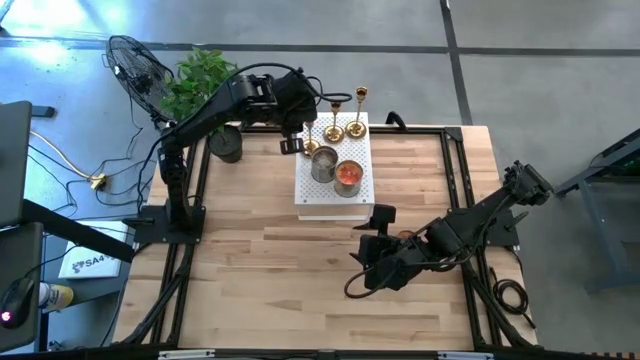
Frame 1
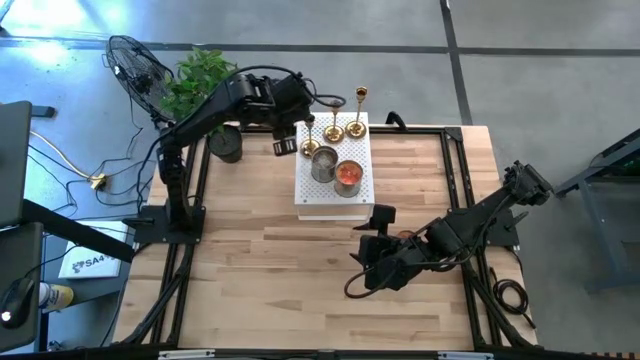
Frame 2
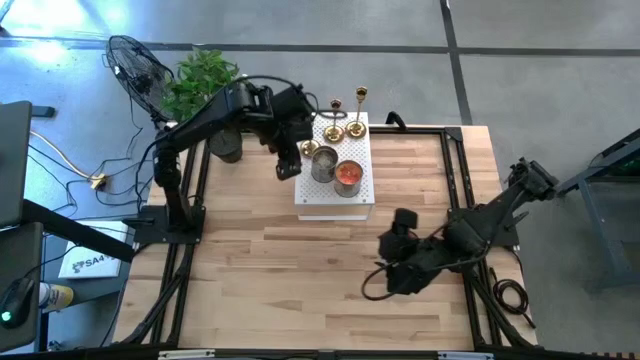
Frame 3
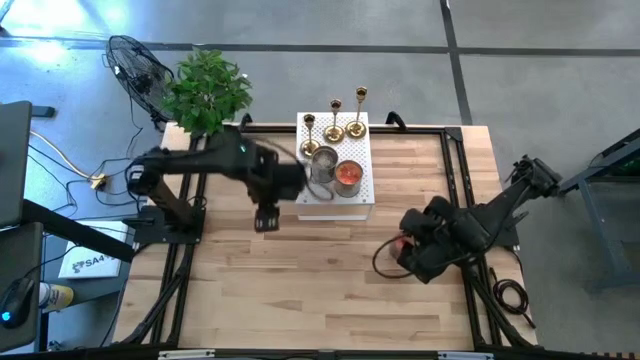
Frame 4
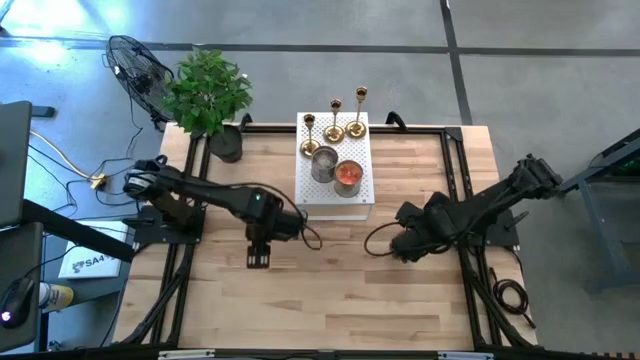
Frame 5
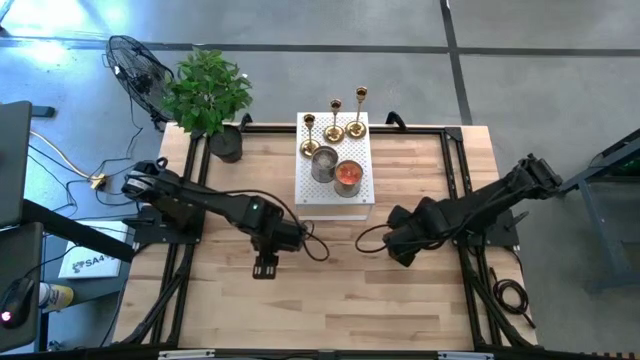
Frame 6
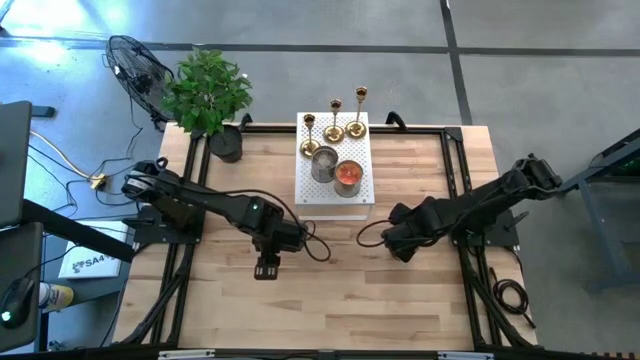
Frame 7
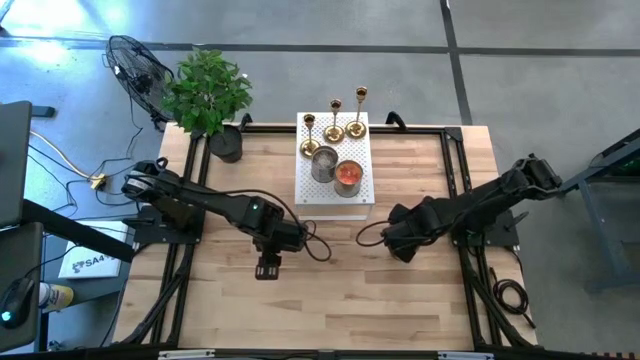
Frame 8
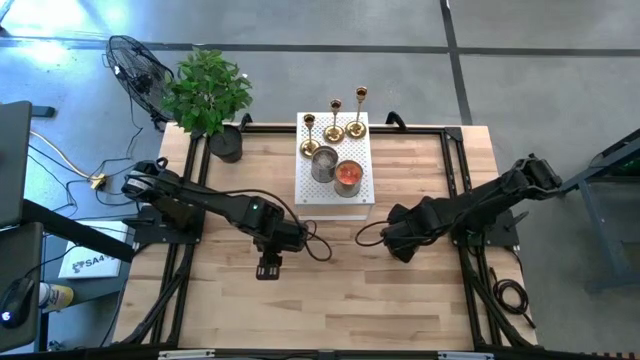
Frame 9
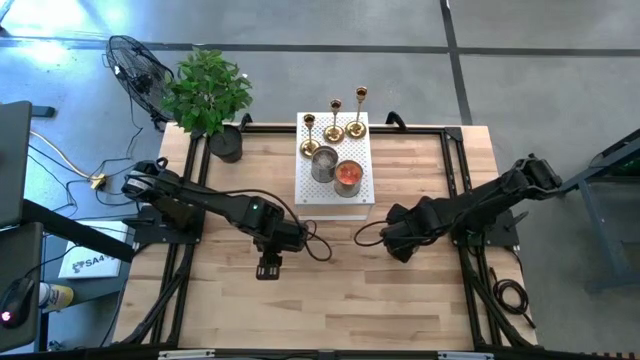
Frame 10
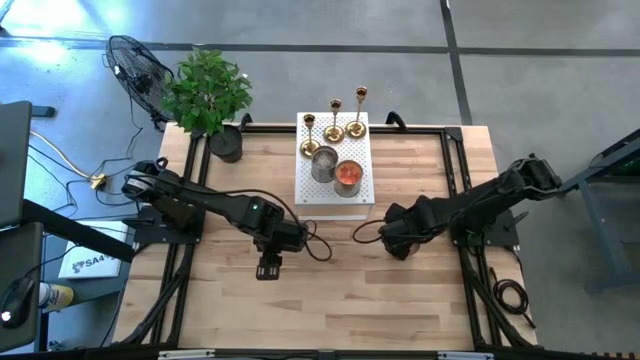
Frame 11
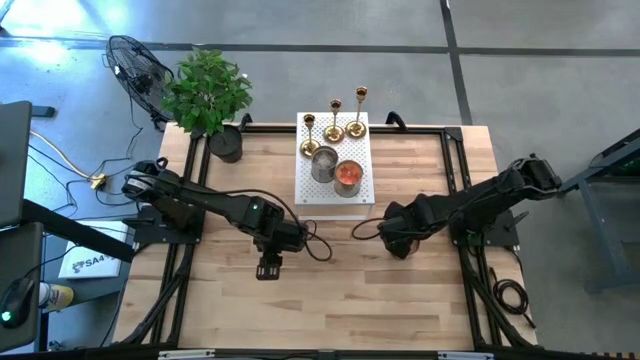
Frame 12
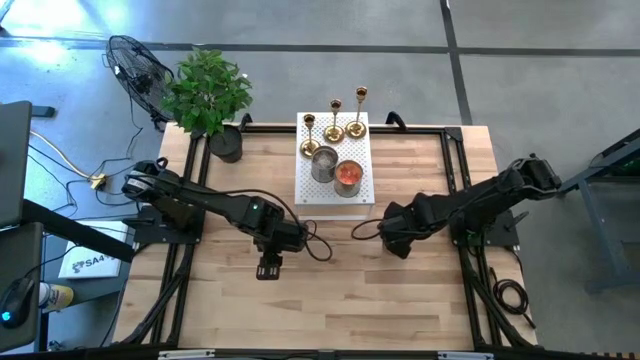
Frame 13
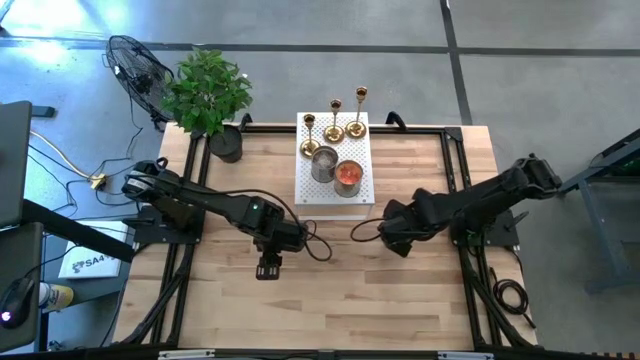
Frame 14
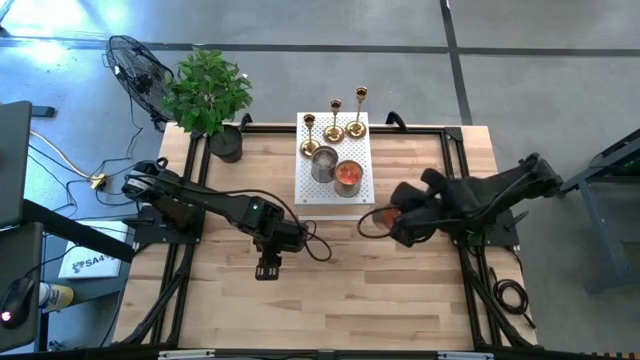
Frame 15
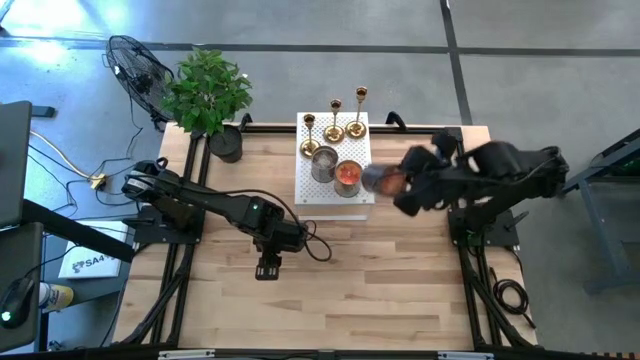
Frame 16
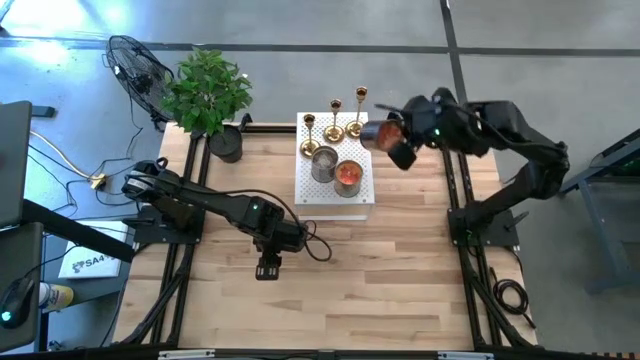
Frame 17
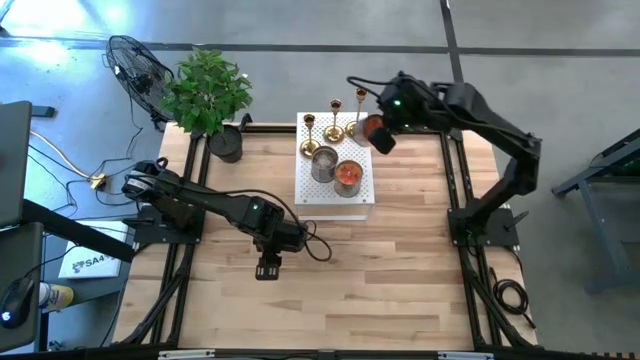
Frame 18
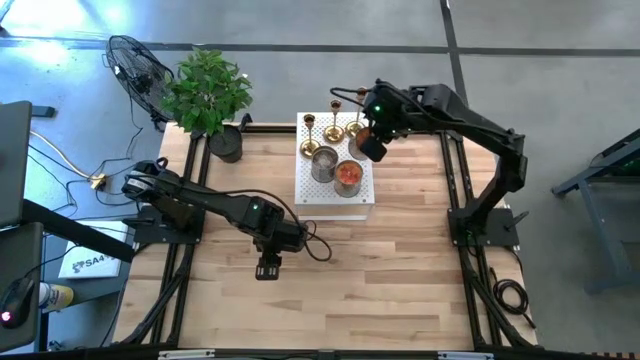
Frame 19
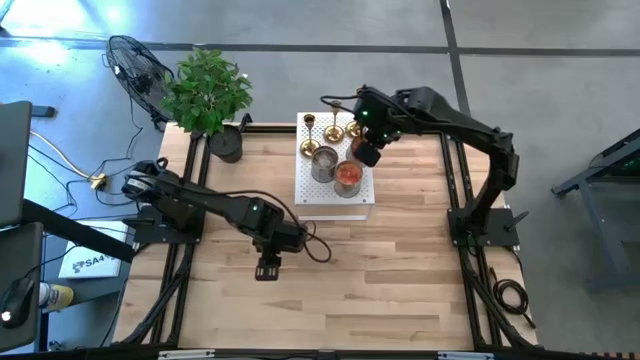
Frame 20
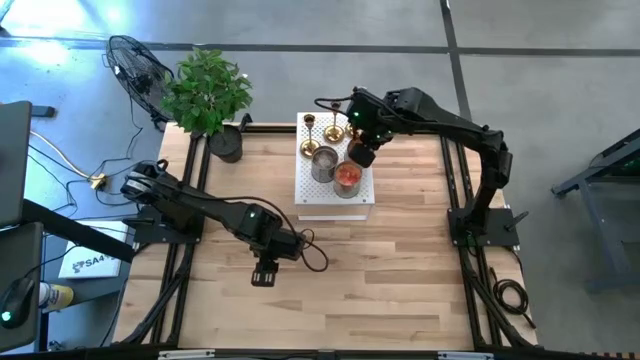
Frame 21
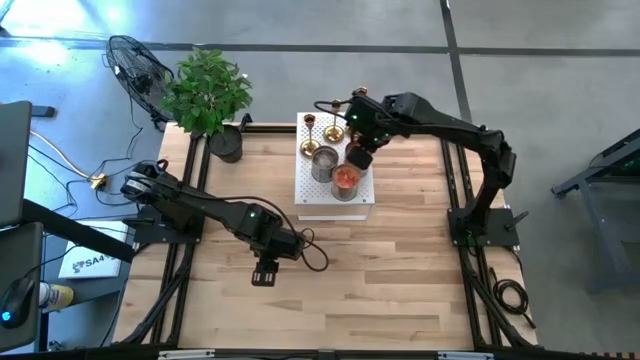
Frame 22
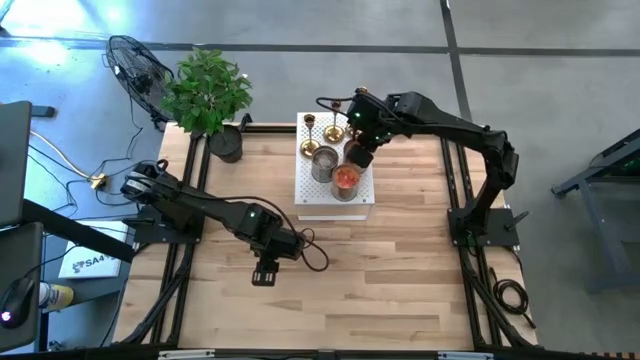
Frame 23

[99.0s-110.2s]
Task: Pick & Place candle stick holders
Put the orange scented candle on the shelf

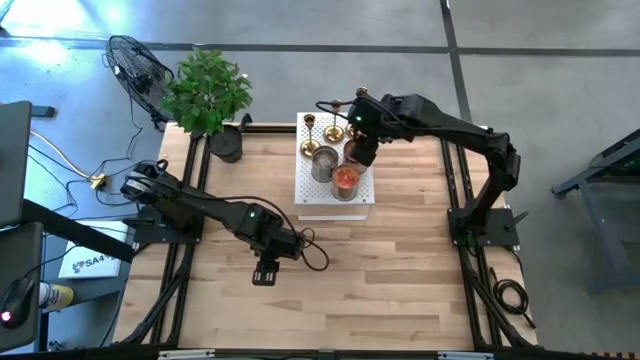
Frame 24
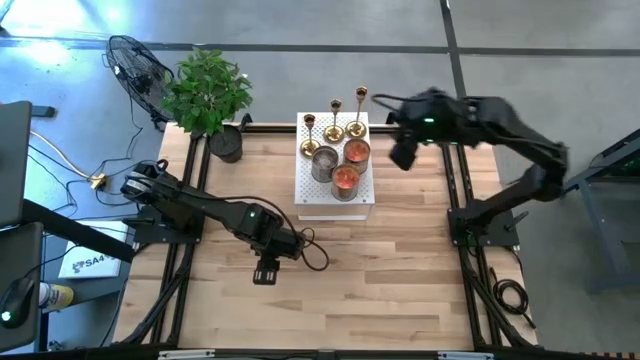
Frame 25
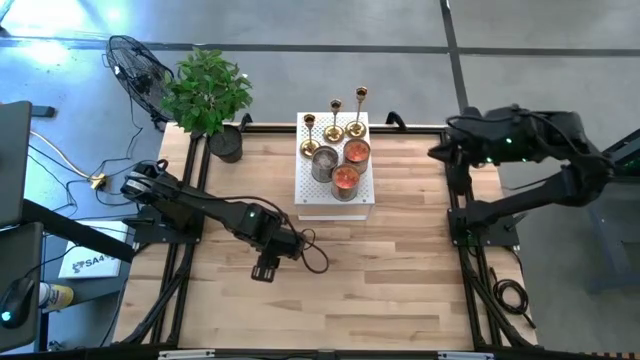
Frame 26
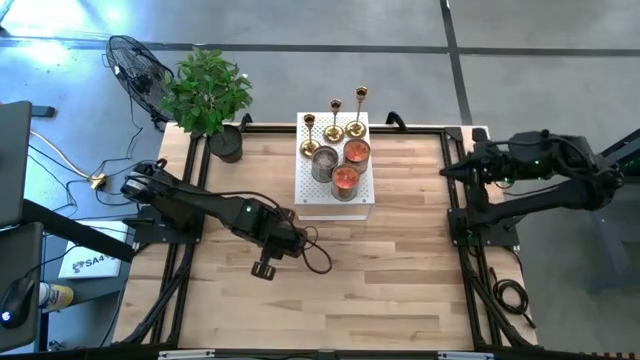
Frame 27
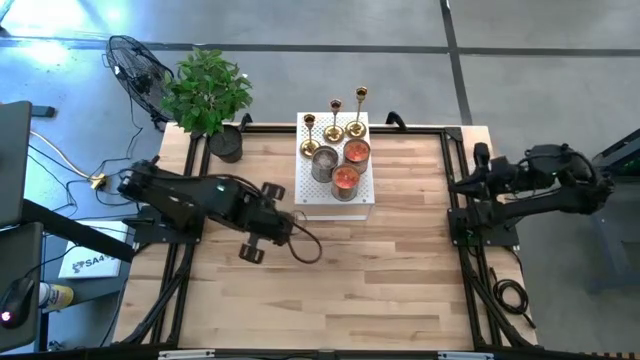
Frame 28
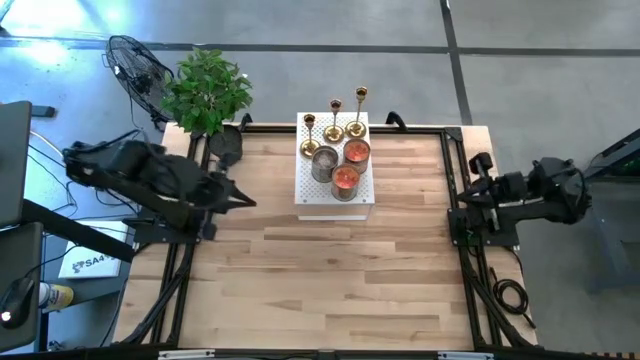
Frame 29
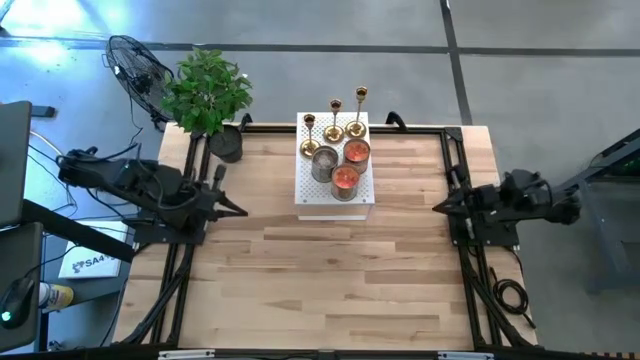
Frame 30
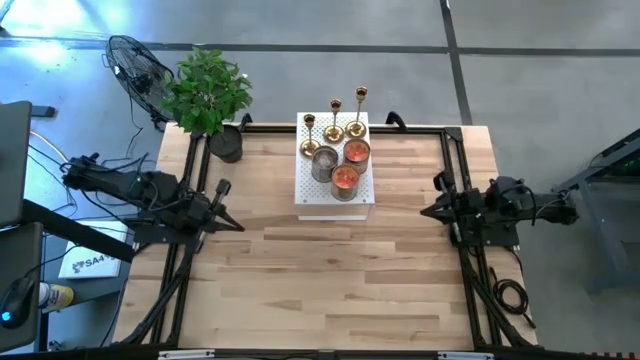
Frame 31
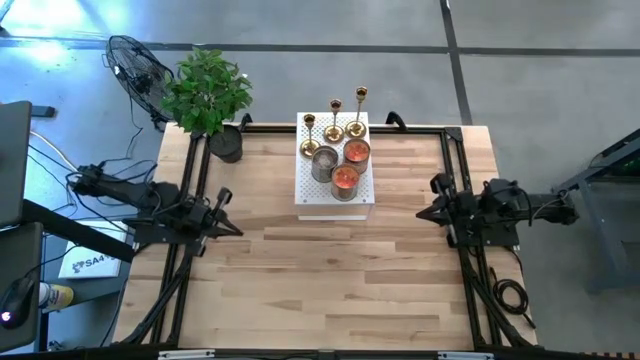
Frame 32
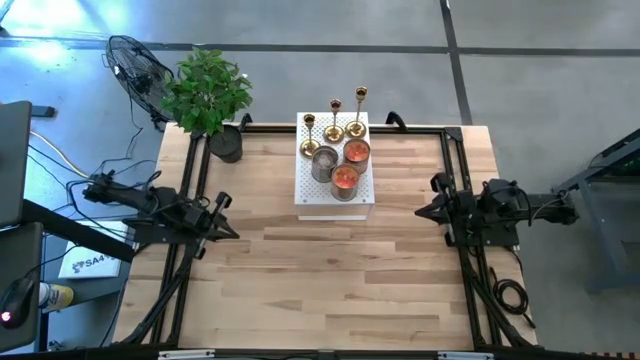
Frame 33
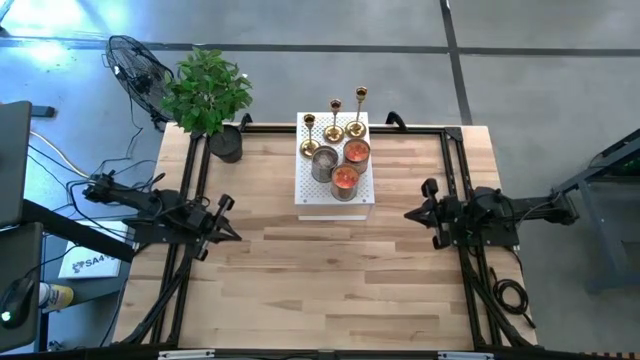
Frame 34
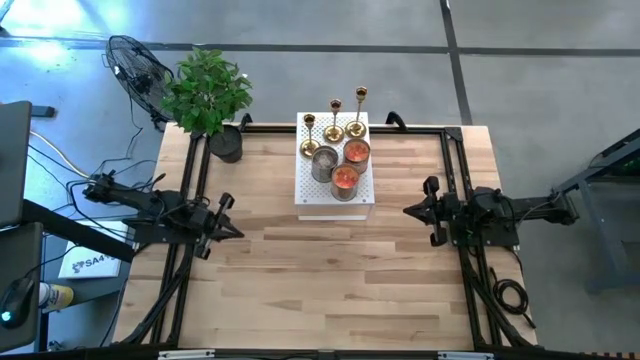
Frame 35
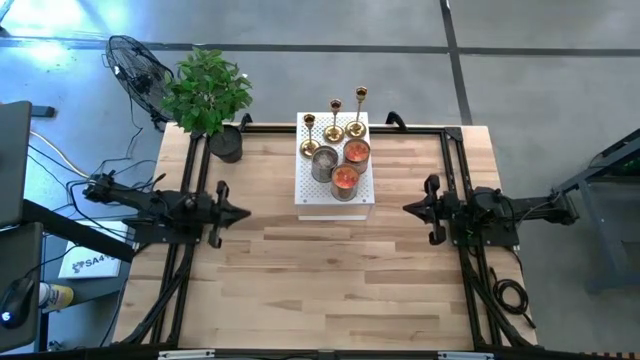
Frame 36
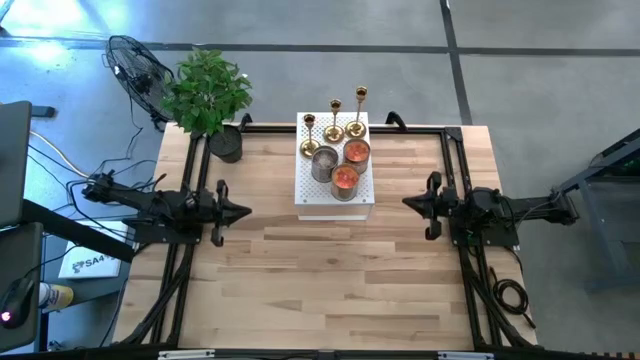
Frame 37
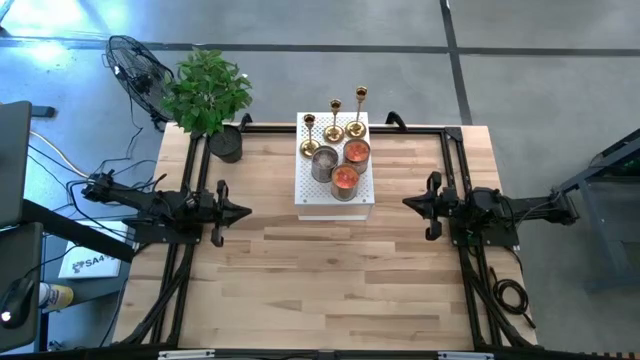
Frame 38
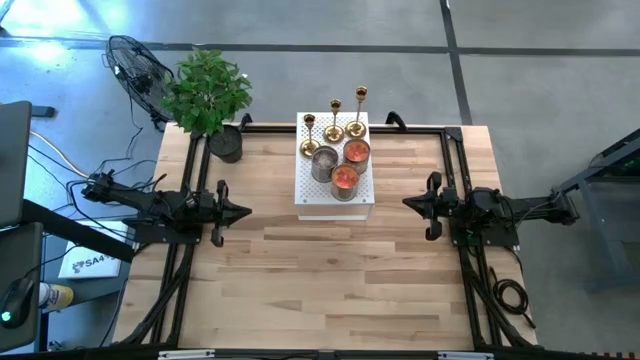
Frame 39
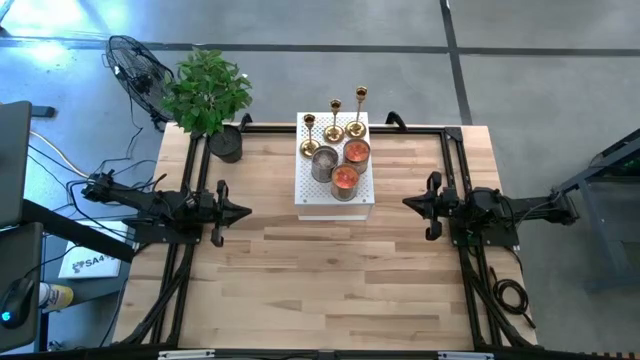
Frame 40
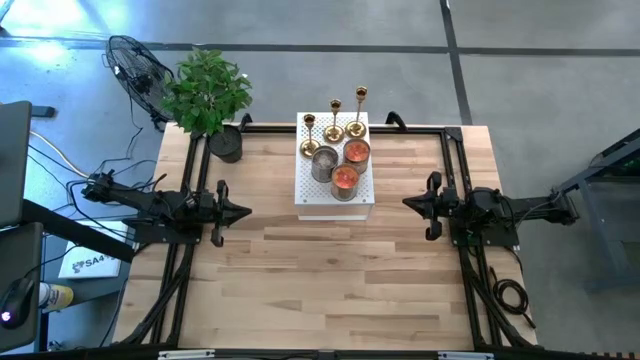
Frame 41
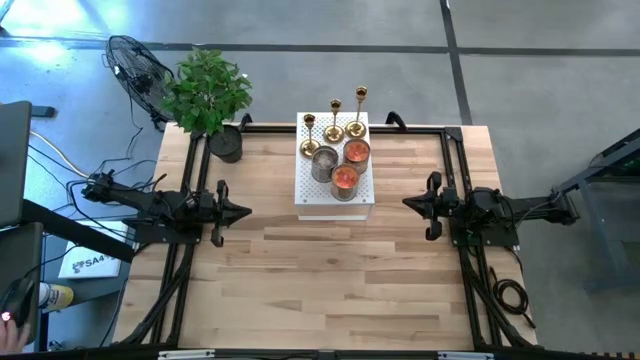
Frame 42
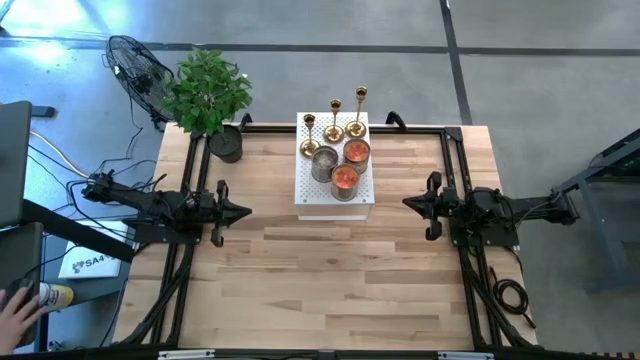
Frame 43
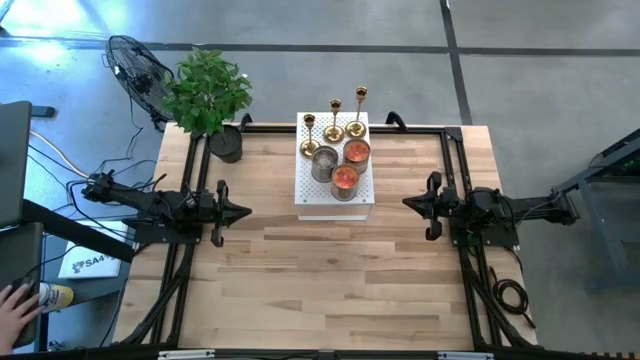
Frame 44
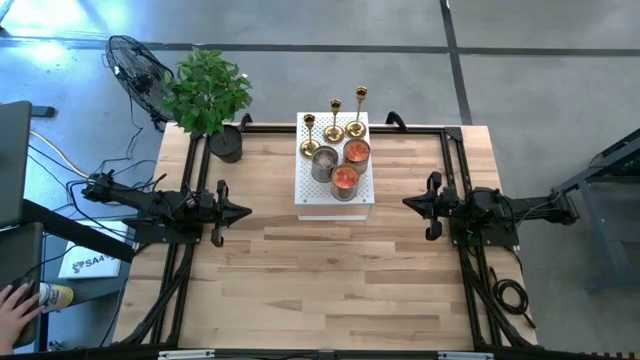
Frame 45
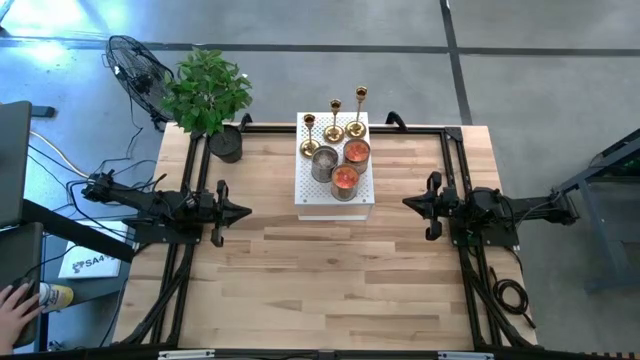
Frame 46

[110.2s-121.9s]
Return to Home Position
